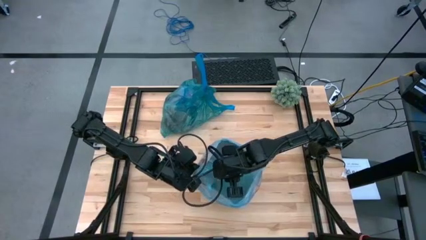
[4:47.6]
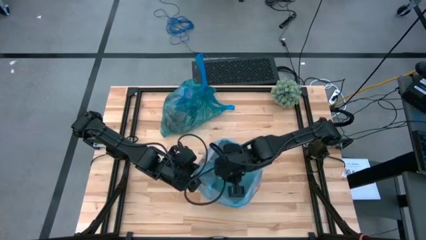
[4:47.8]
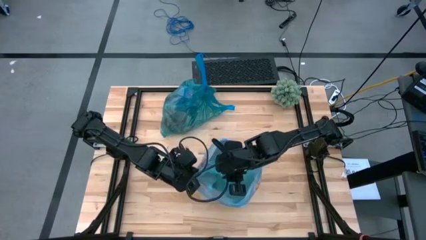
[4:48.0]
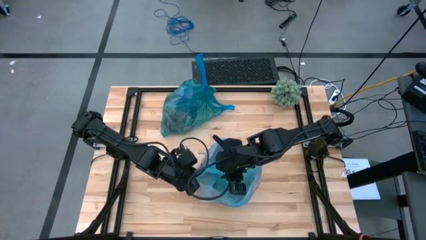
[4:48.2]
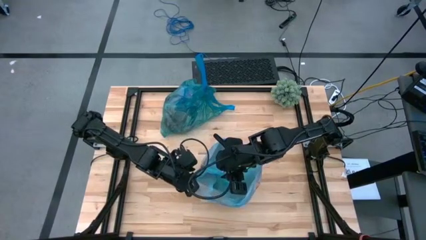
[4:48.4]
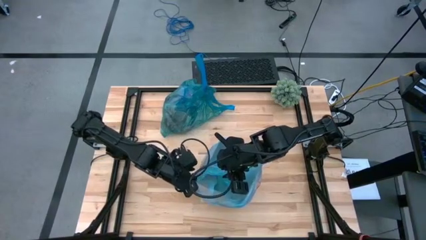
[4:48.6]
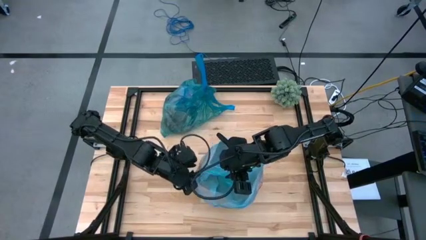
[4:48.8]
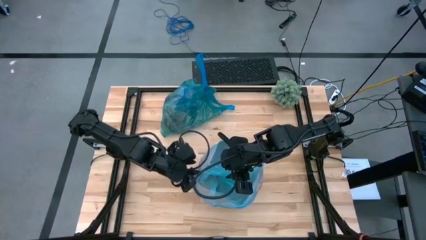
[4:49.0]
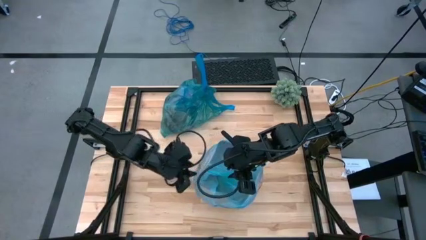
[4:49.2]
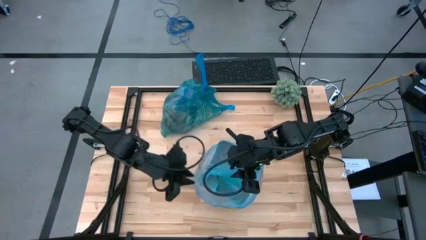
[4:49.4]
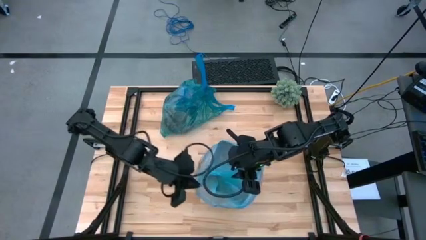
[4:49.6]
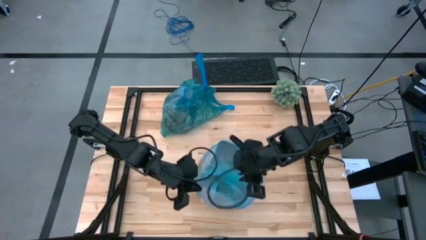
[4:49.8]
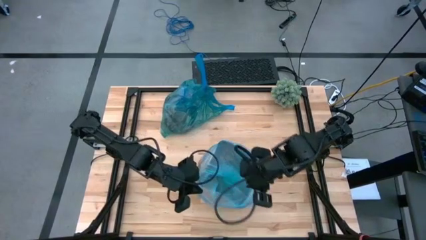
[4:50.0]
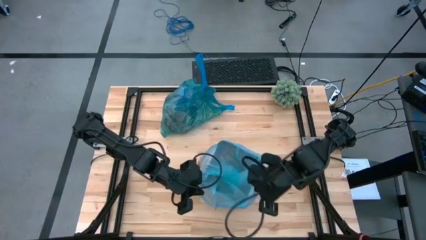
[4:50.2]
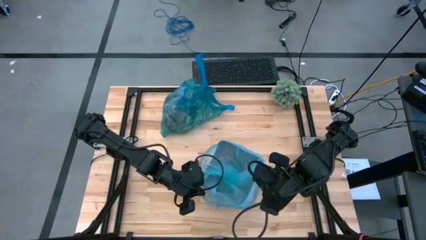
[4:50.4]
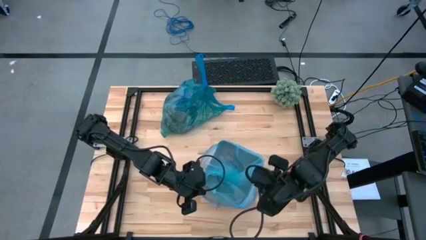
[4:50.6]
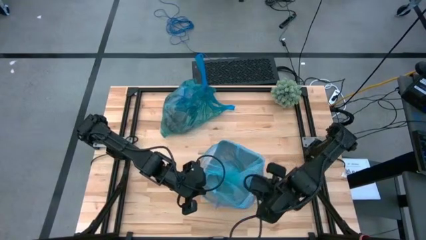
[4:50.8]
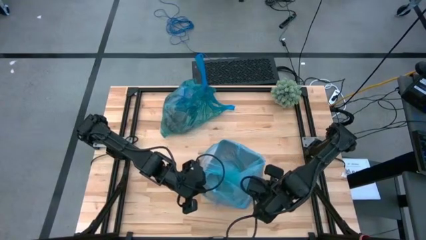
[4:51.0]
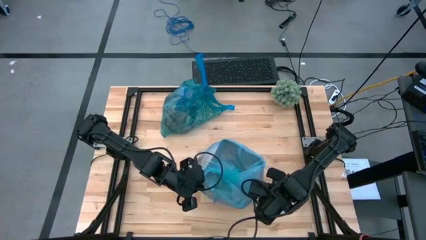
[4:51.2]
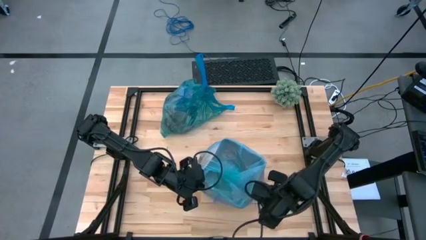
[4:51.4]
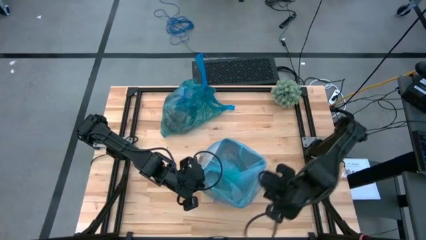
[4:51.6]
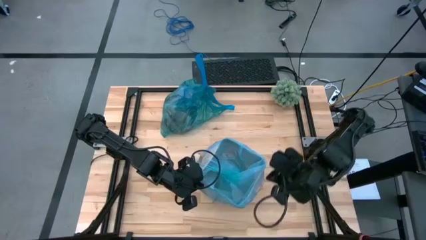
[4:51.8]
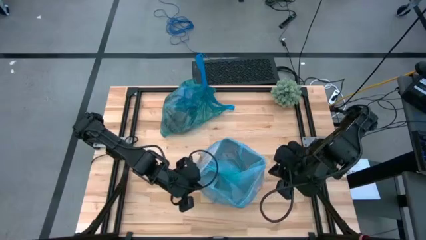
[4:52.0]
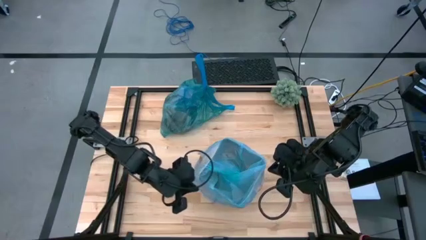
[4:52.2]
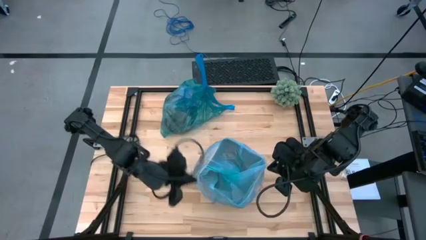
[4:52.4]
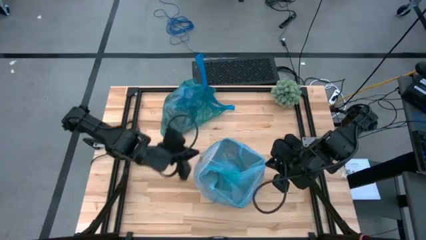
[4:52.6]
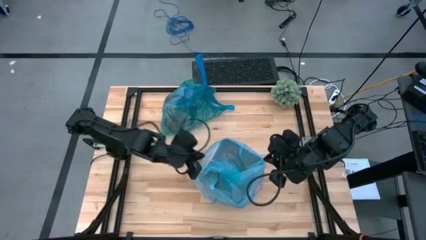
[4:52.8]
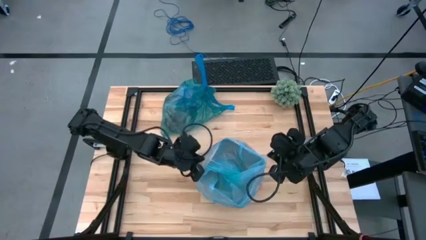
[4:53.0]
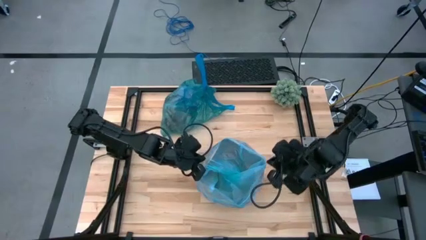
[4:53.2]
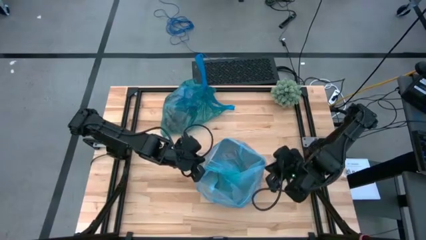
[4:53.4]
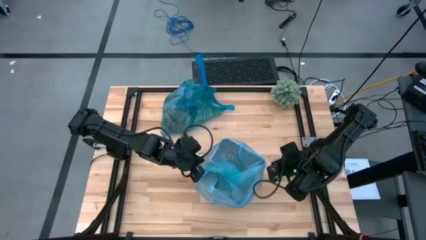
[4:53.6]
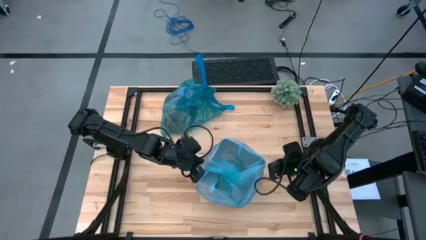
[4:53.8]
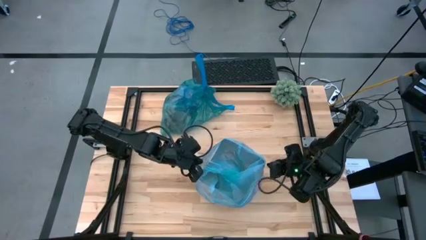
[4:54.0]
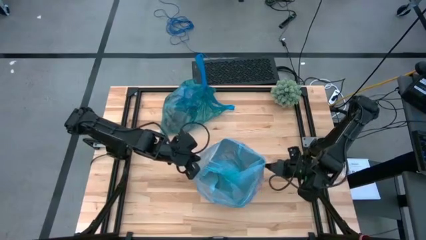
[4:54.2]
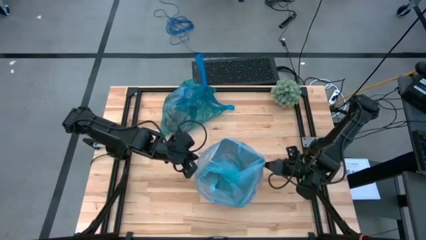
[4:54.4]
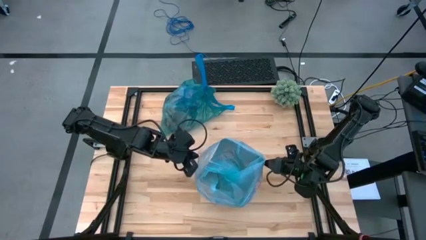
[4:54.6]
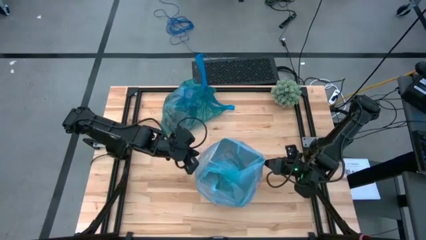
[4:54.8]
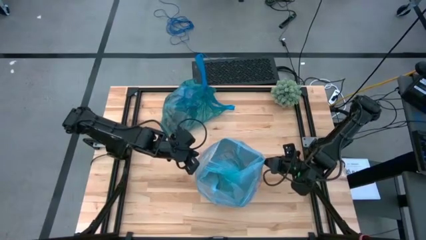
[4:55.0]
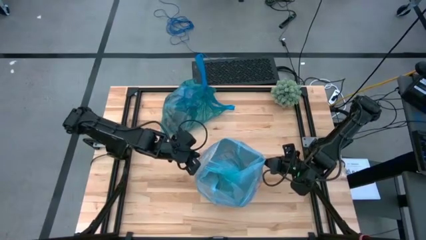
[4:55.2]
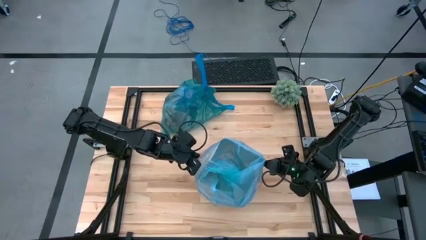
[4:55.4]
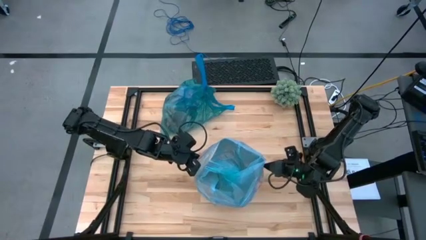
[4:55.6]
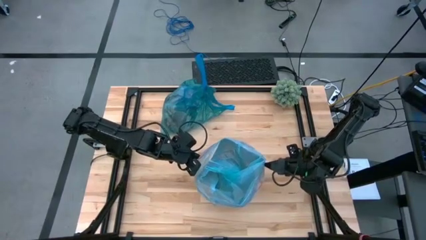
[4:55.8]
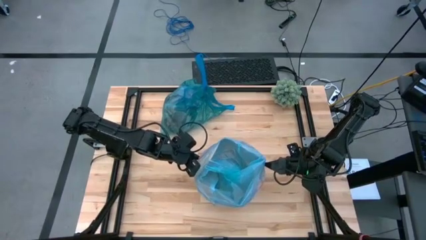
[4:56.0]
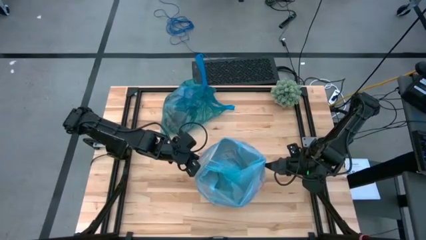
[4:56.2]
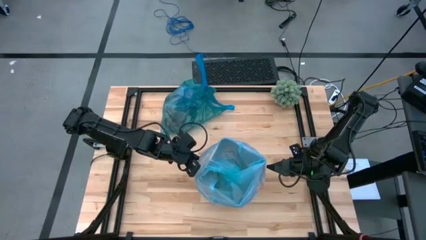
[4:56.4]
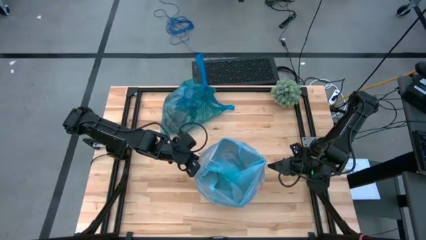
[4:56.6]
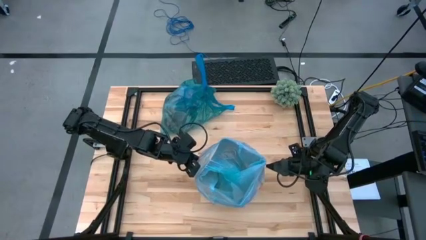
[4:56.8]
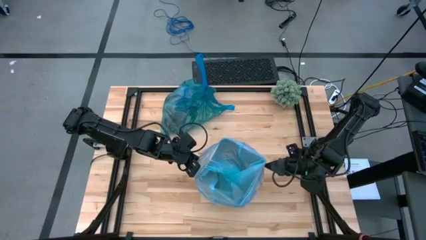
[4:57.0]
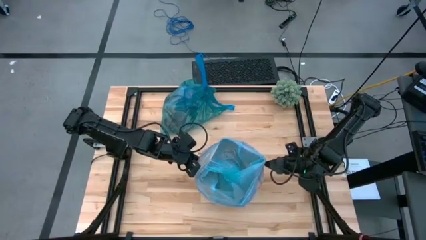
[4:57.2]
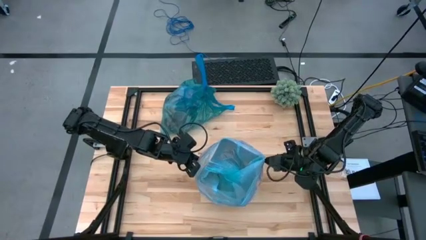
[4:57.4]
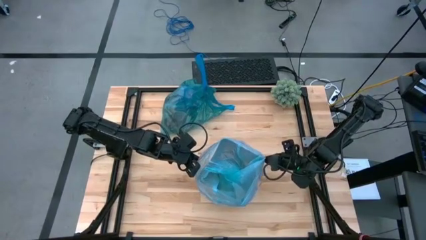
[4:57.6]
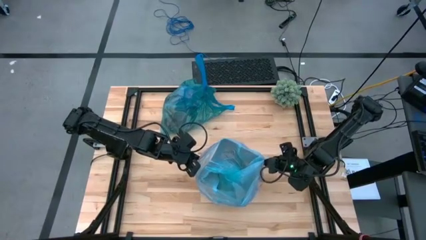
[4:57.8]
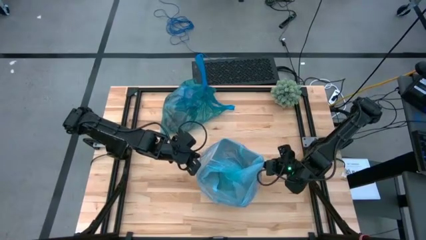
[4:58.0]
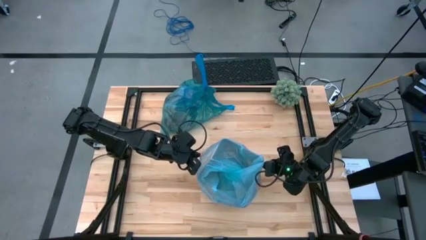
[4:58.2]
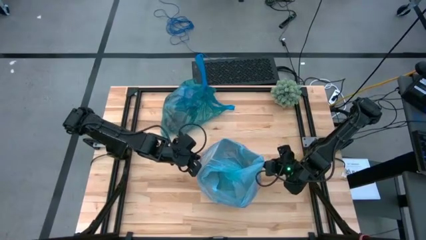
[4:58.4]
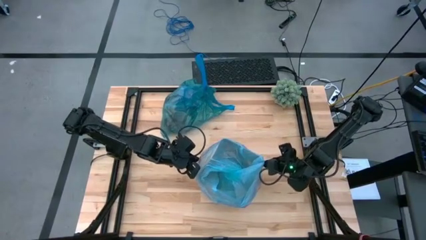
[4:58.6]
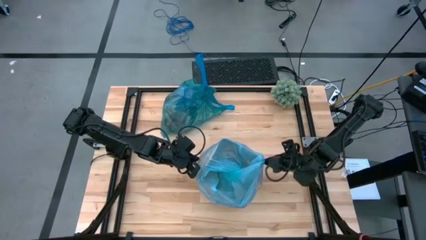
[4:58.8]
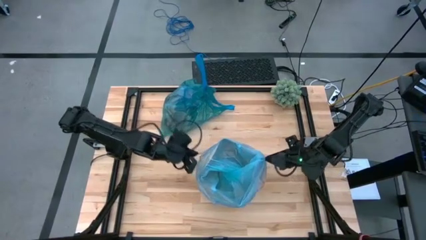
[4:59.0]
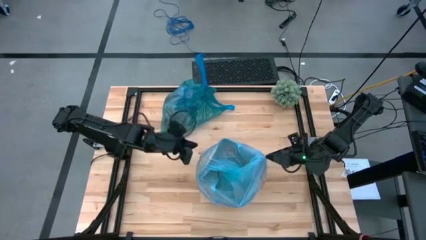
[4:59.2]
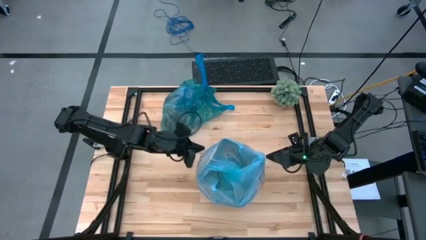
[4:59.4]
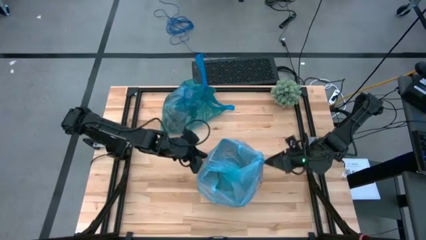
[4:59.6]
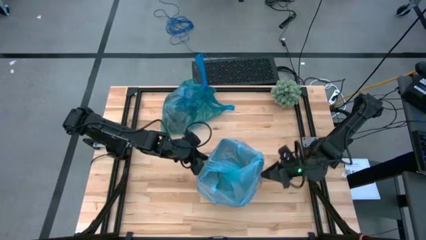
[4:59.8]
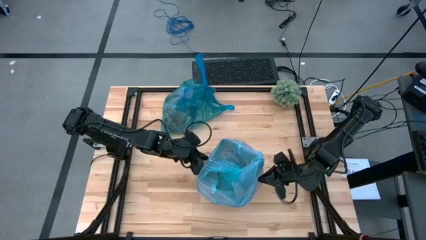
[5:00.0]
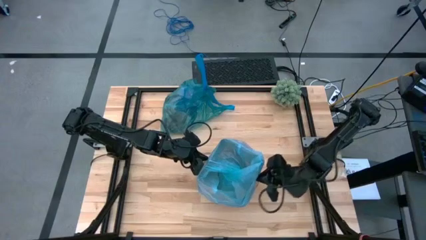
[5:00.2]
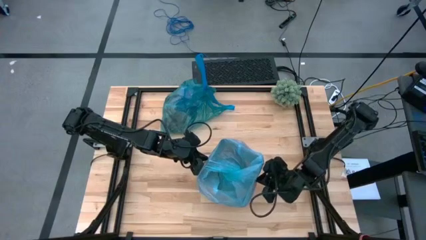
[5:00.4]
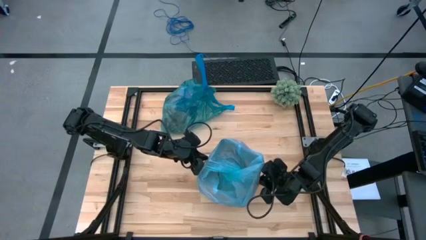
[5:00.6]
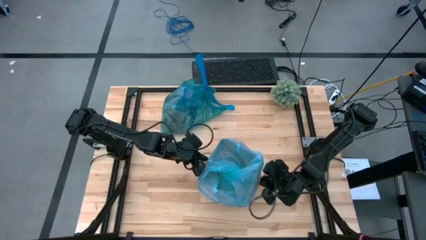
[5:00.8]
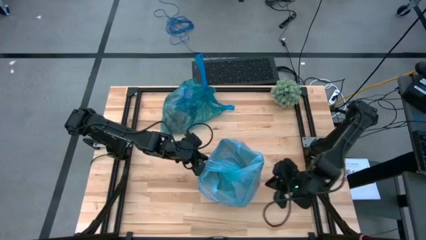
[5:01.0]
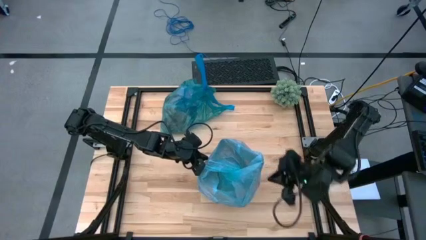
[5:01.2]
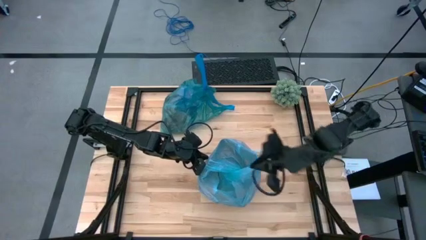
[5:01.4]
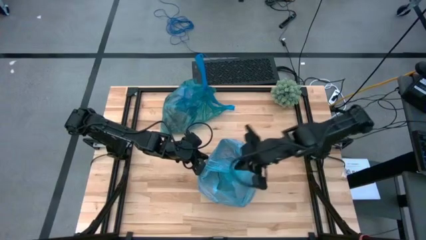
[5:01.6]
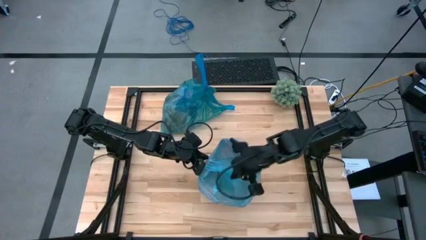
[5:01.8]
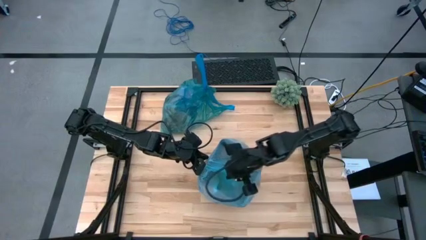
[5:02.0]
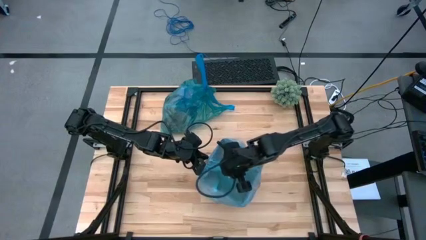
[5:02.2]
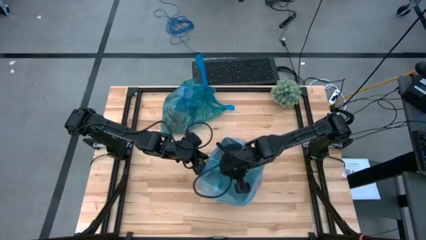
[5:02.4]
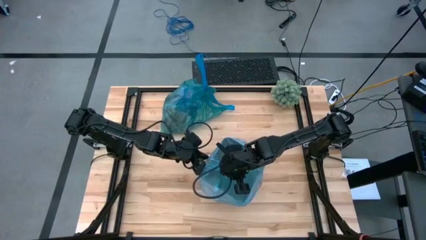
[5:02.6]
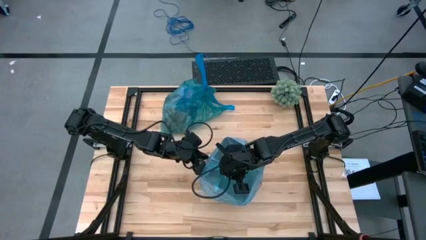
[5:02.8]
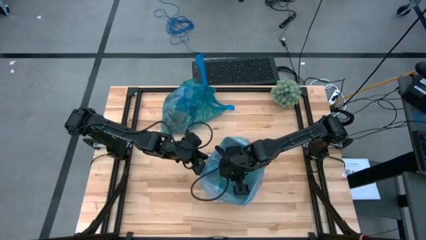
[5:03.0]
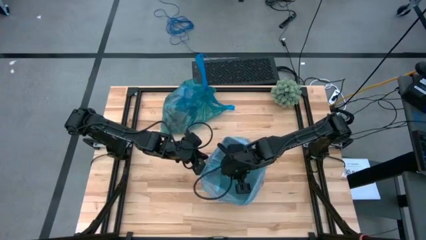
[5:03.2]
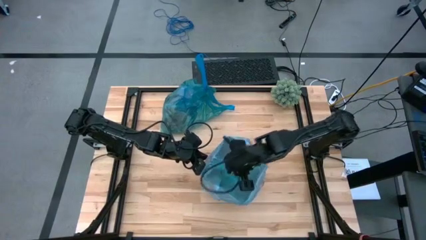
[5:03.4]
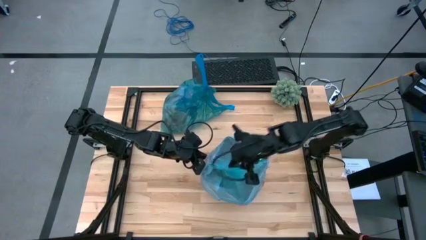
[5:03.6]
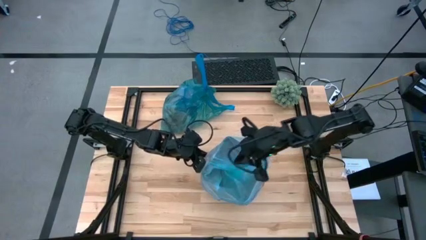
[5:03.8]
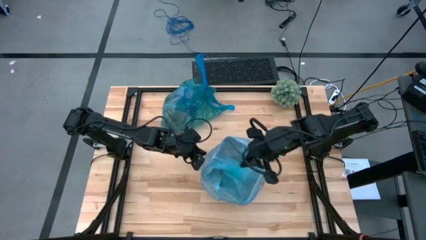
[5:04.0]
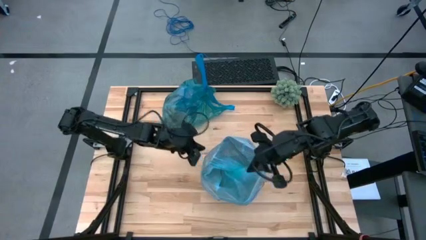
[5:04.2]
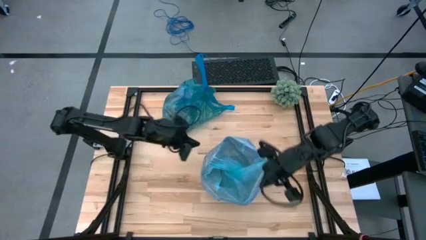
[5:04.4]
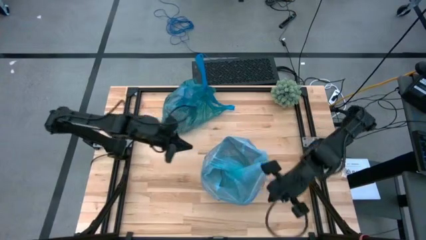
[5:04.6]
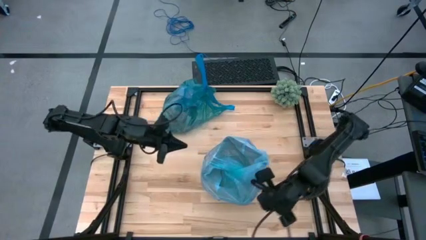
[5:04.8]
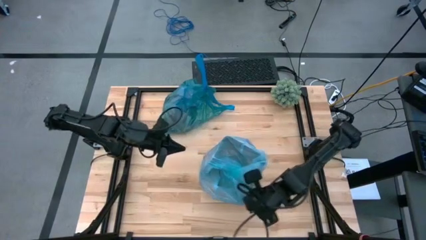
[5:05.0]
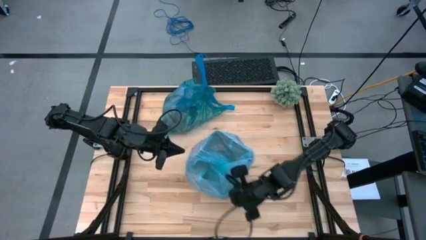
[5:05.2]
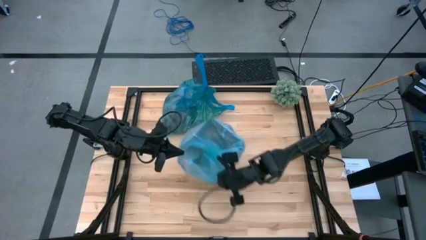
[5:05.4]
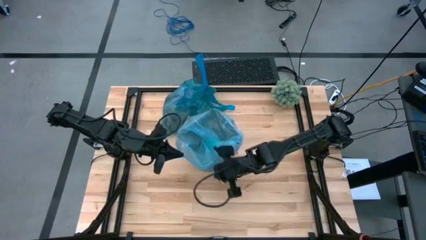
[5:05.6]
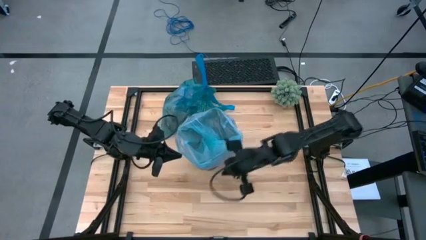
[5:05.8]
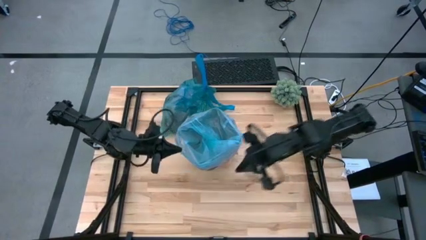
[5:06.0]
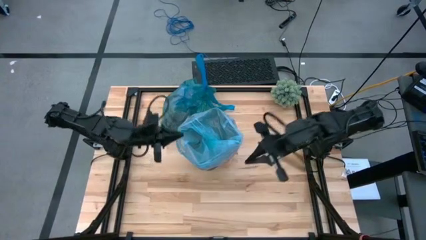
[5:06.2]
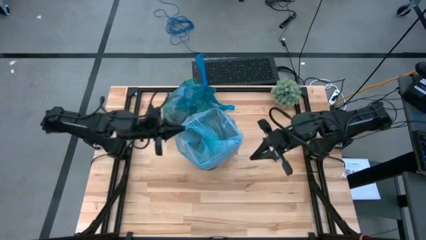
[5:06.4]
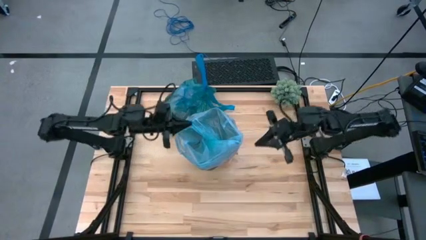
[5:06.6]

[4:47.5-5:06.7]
Task: place trash/remove bag and relplace
Insert the new trash bag into the trash bin
